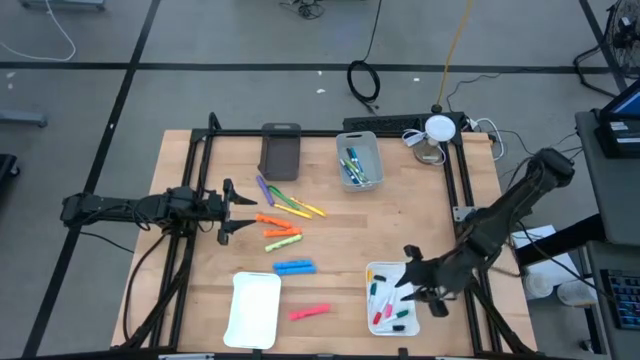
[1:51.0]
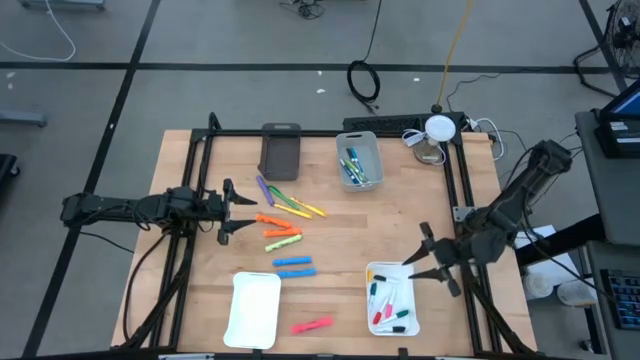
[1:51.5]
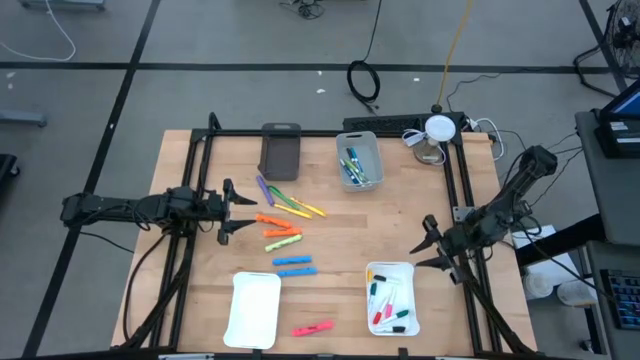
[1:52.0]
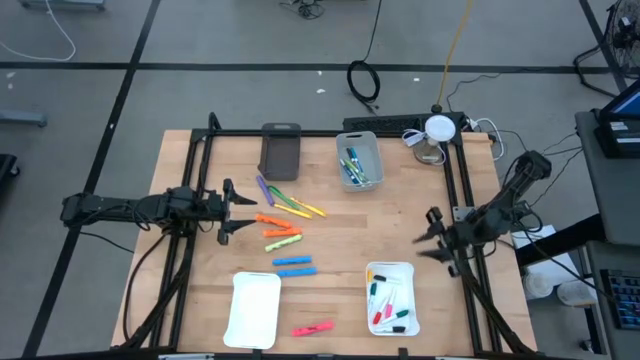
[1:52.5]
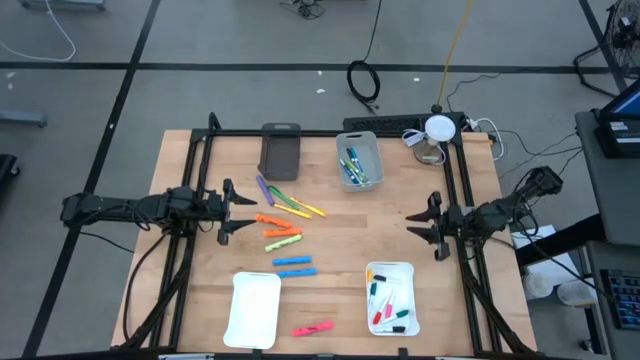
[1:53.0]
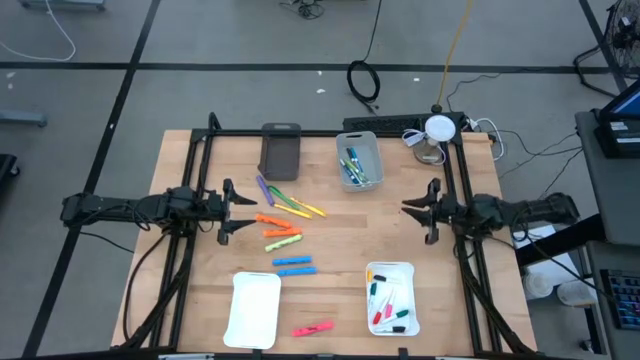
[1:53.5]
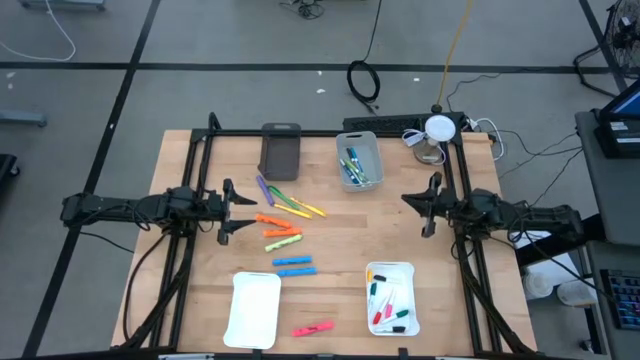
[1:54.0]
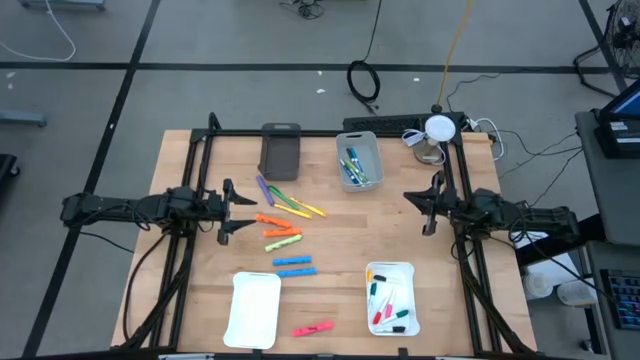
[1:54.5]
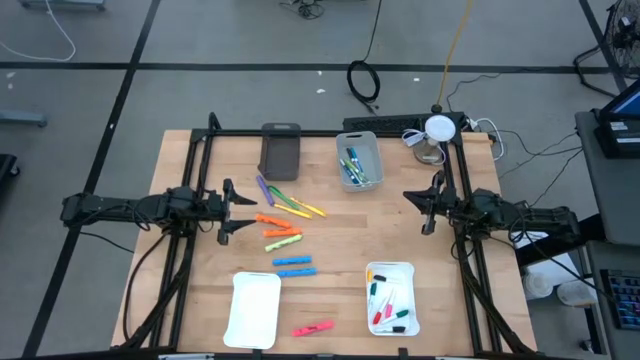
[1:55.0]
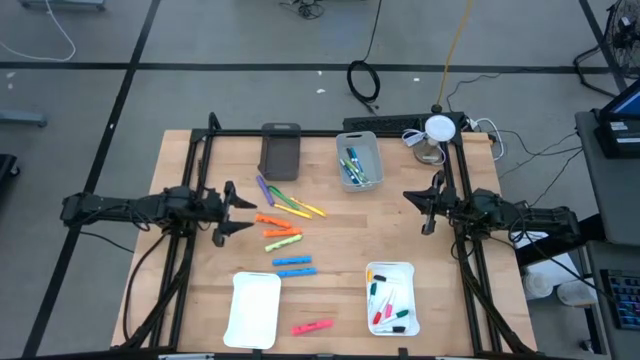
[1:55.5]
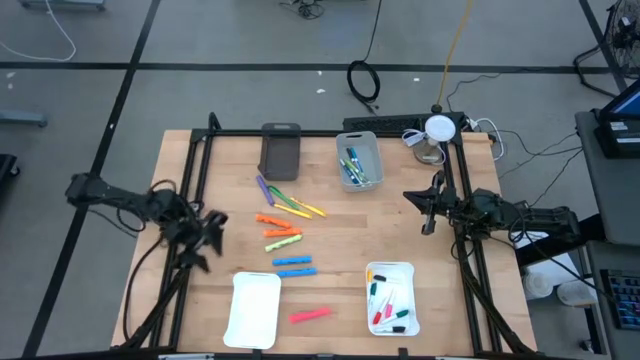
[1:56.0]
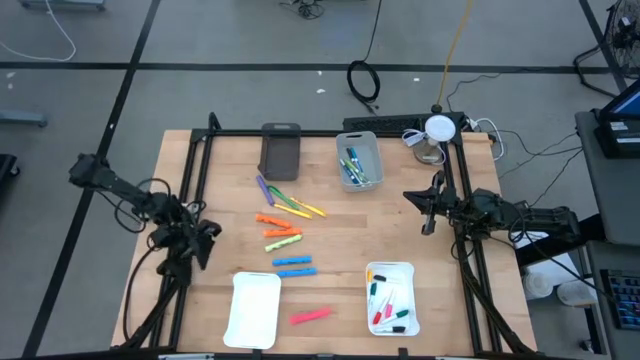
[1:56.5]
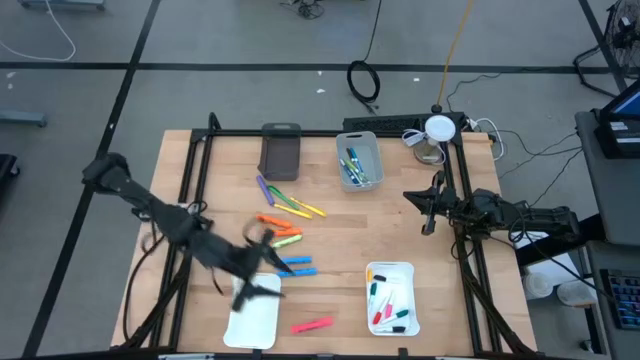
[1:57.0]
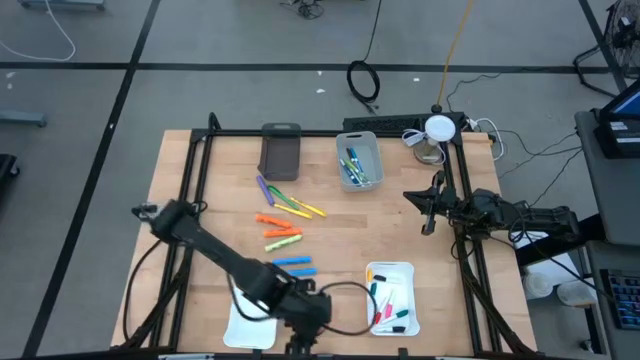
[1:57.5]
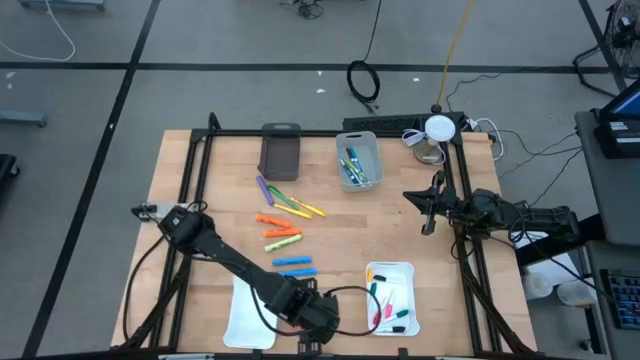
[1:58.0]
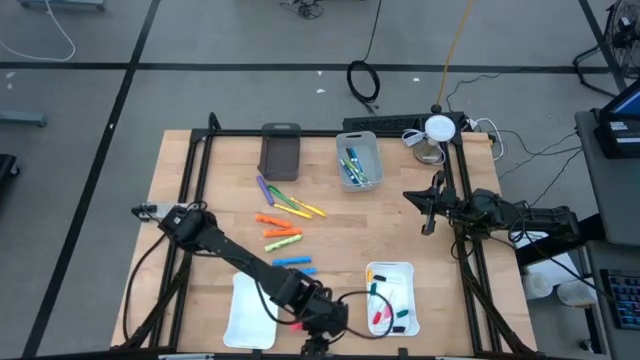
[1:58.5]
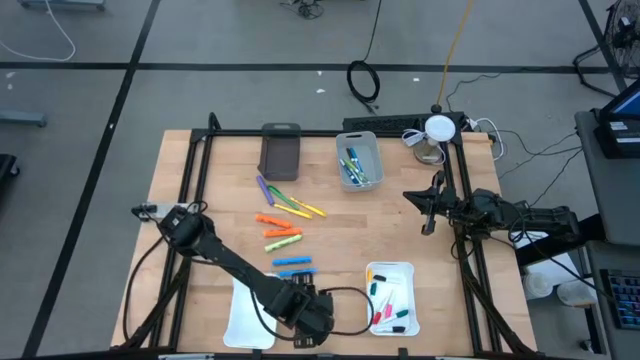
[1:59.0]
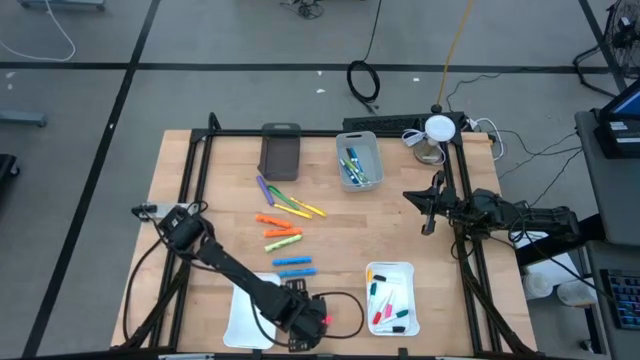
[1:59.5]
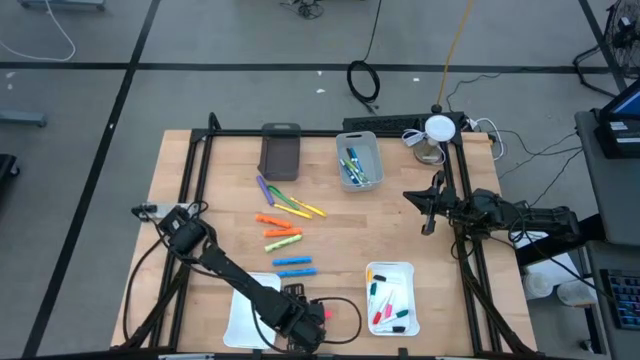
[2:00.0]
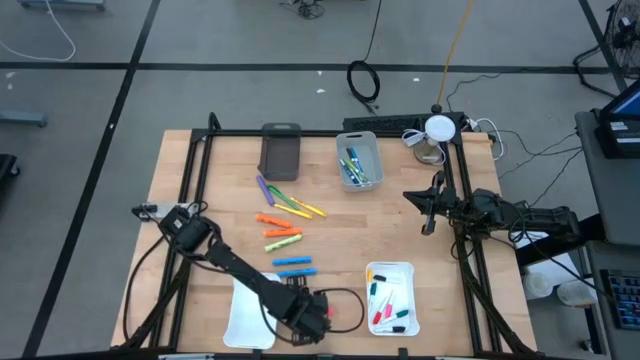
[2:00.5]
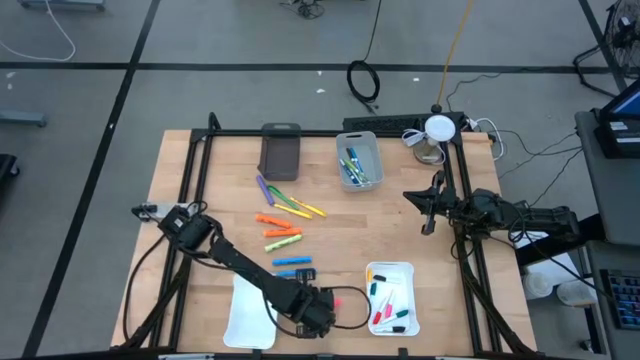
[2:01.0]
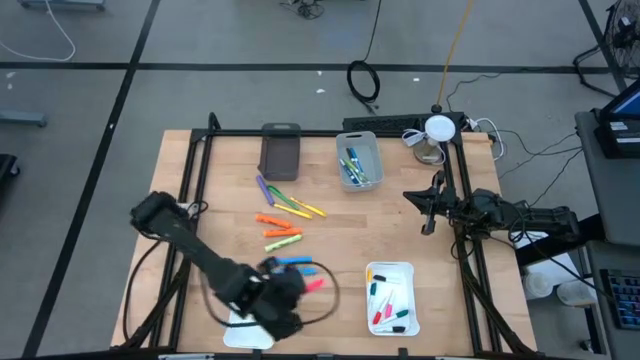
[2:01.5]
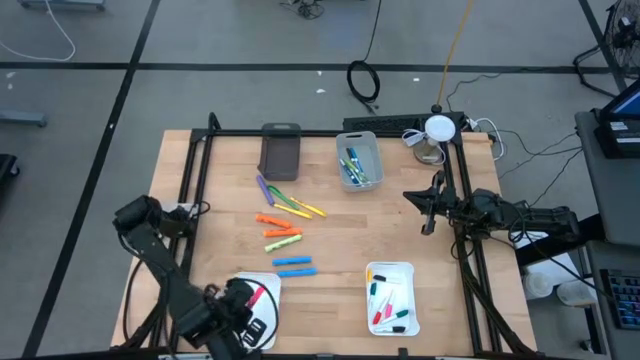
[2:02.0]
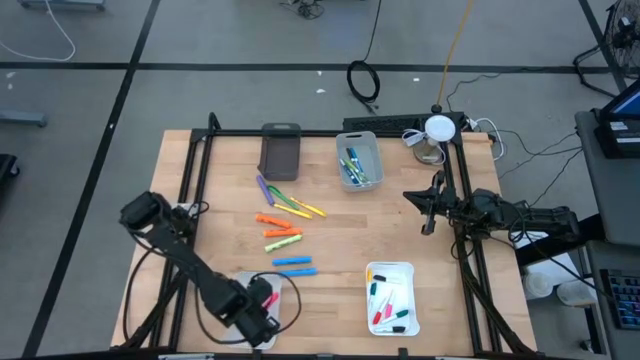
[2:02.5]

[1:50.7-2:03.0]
Task: Pick & Place Markers
Put the pink marker pen into the left white bin

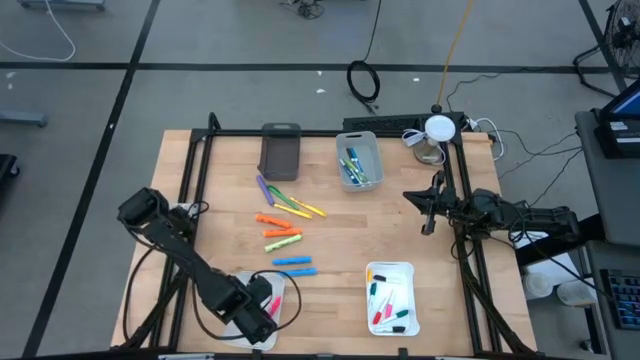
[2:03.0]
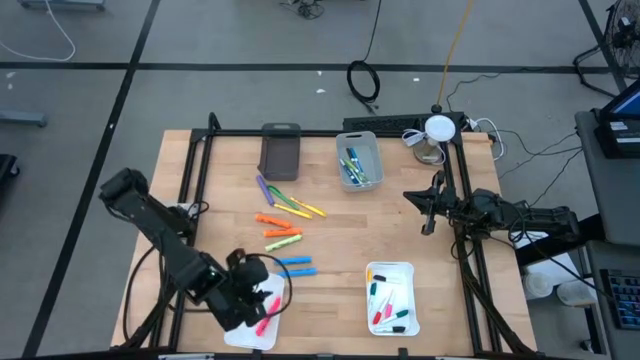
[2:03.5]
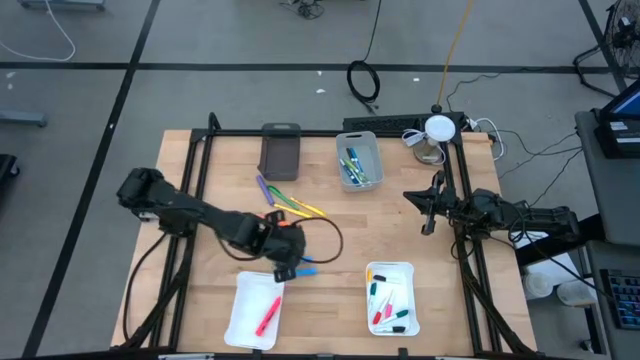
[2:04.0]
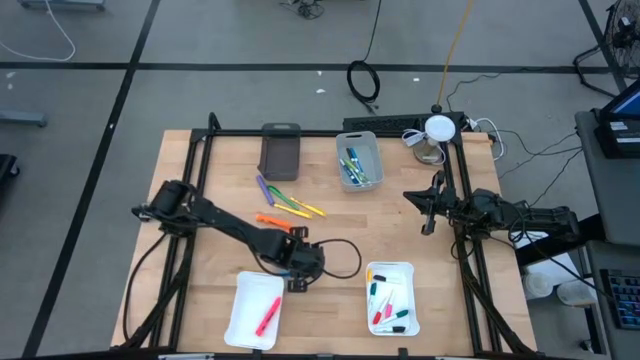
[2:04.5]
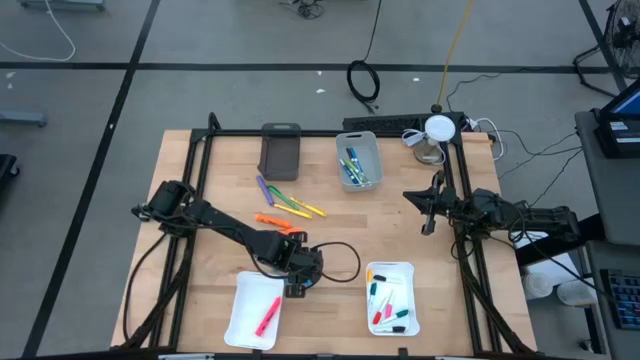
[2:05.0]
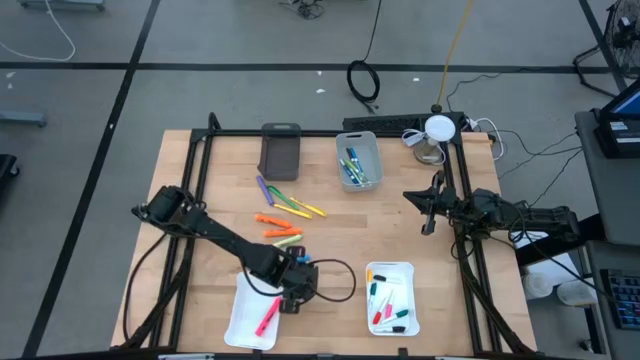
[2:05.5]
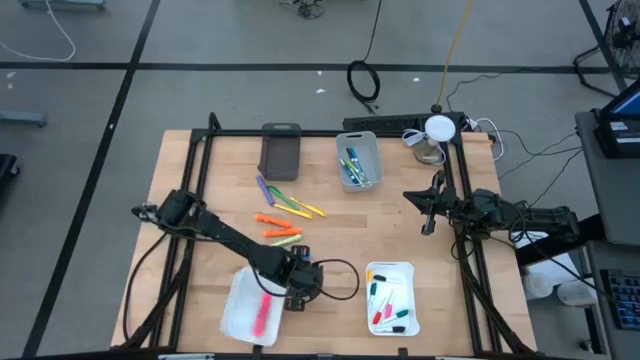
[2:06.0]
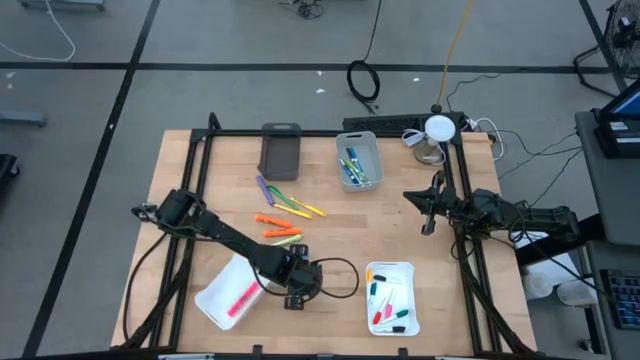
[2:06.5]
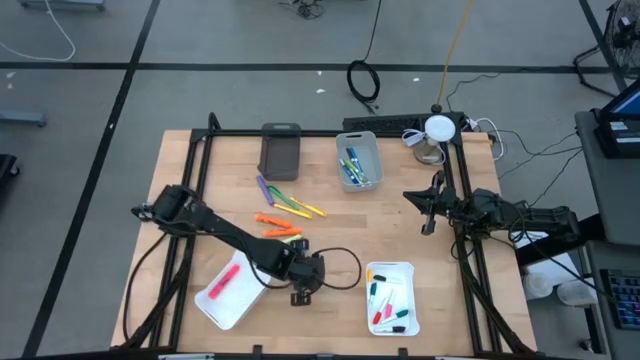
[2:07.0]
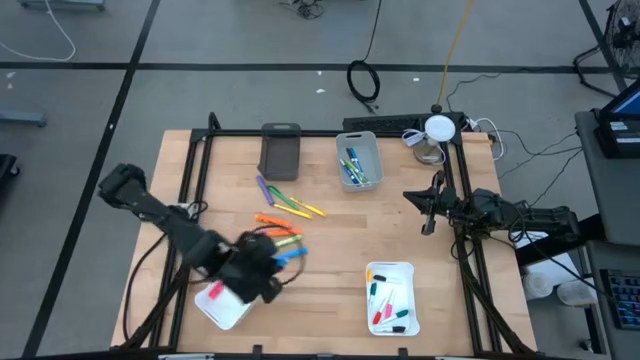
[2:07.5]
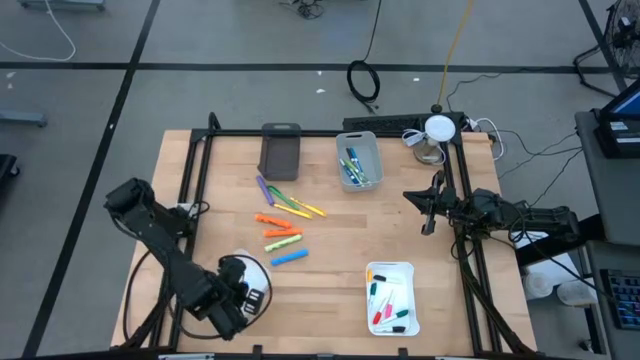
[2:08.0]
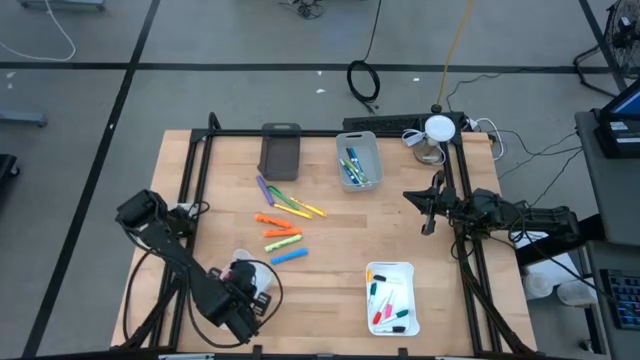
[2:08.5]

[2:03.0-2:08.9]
Put the bottom blue marker pen into the left white bin

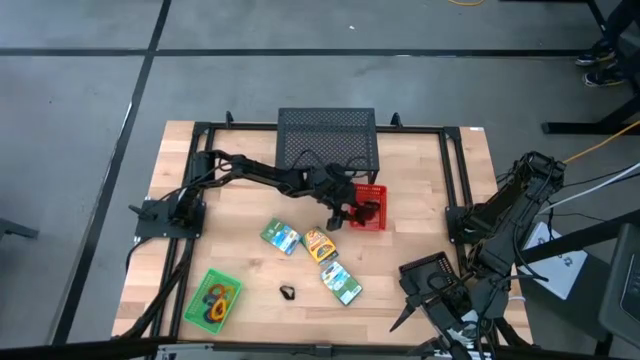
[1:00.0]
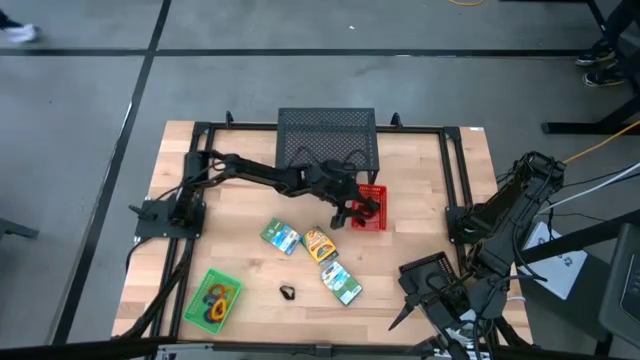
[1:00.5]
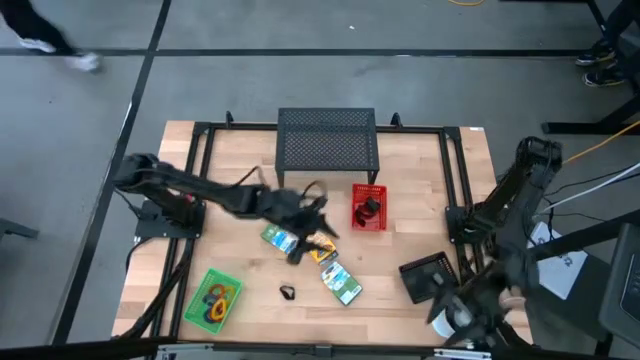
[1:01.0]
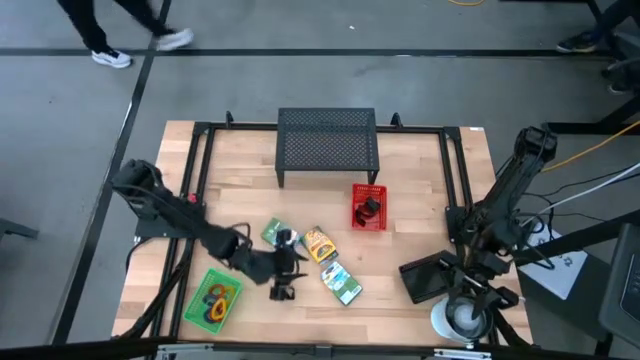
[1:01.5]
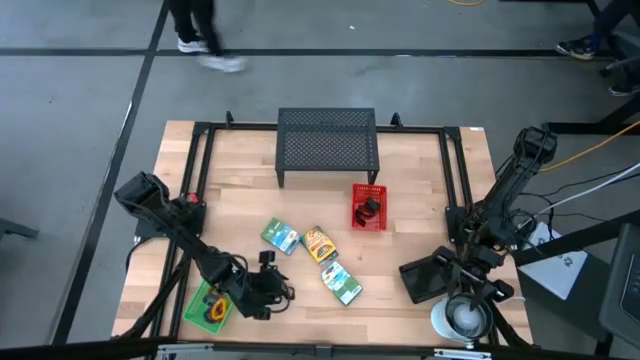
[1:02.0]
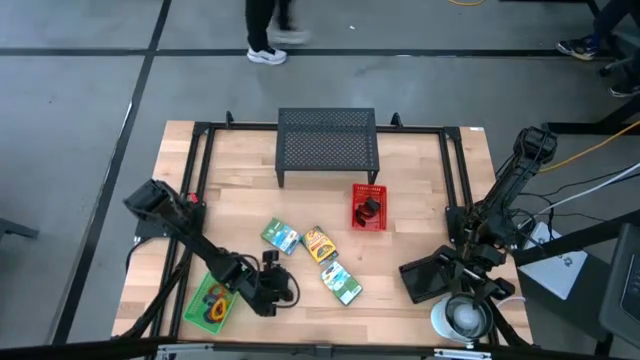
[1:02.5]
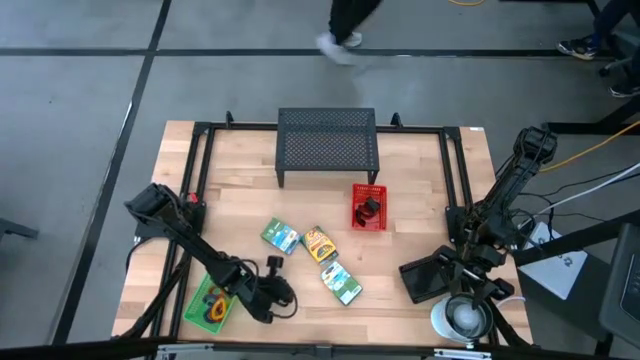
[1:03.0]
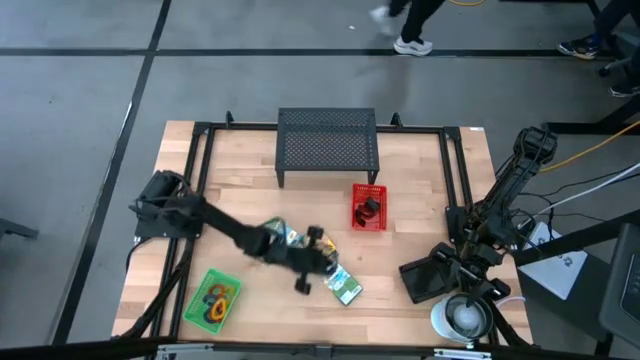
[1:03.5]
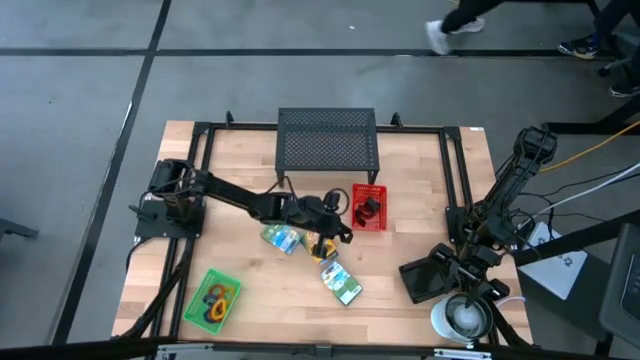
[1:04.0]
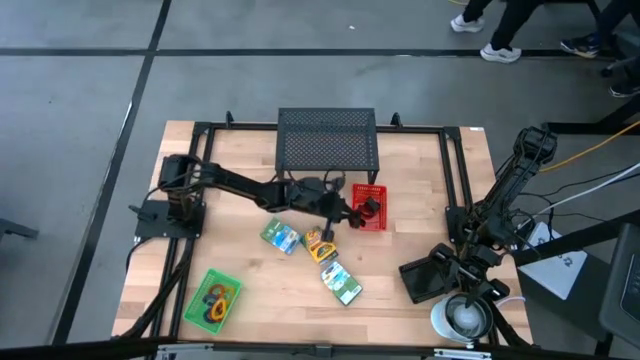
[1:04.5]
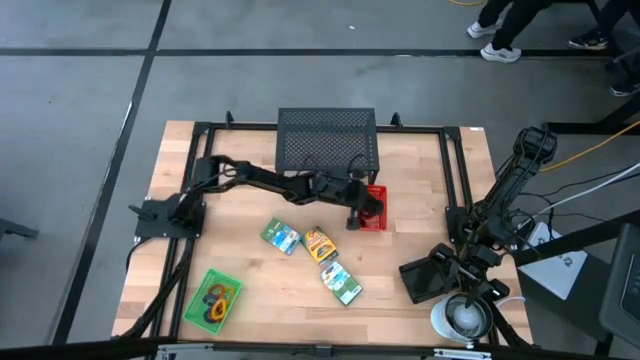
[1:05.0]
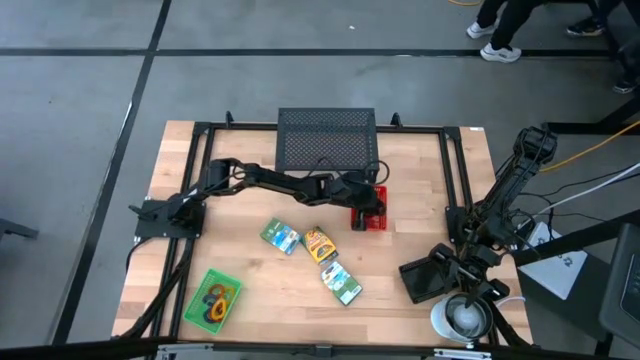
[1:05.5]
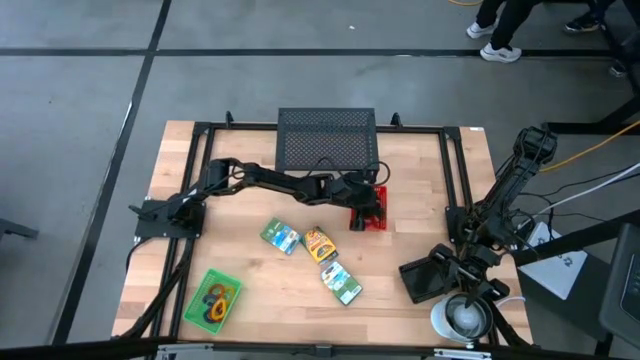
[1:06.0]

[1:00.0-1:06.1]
Task: Pick & Place Office Desk Supplies
Put the black rubberband into the red bin
